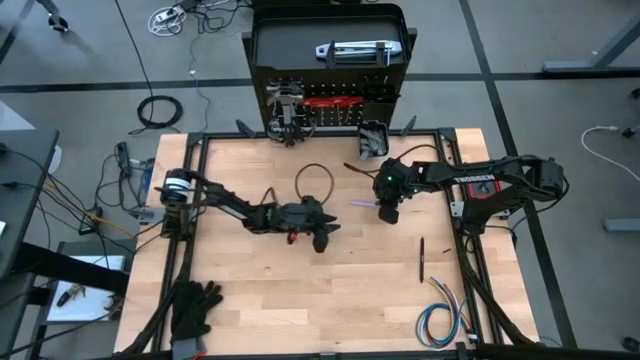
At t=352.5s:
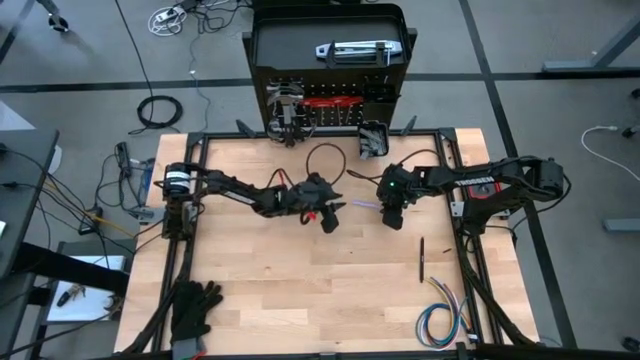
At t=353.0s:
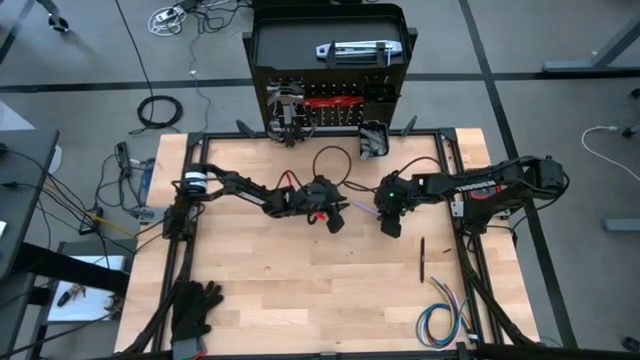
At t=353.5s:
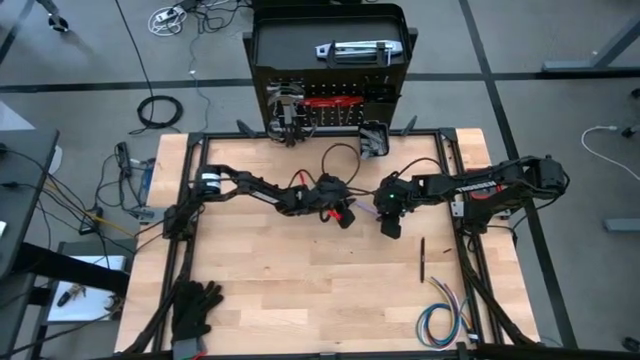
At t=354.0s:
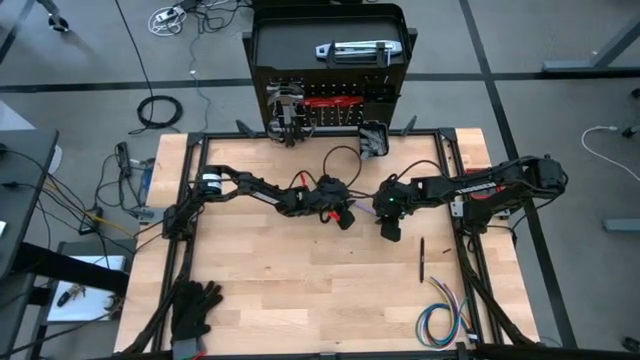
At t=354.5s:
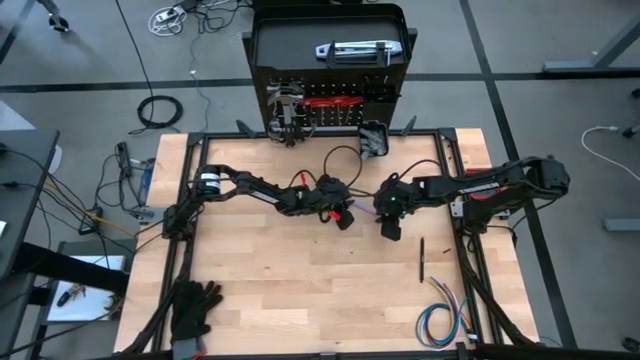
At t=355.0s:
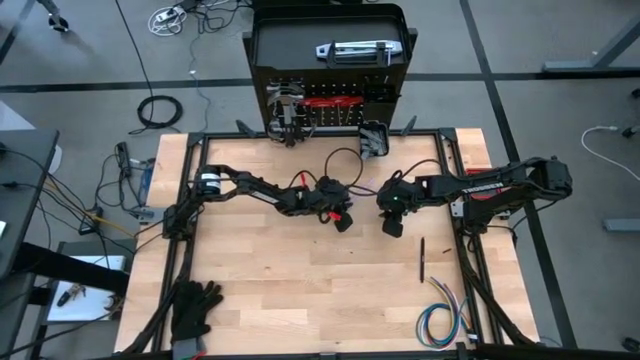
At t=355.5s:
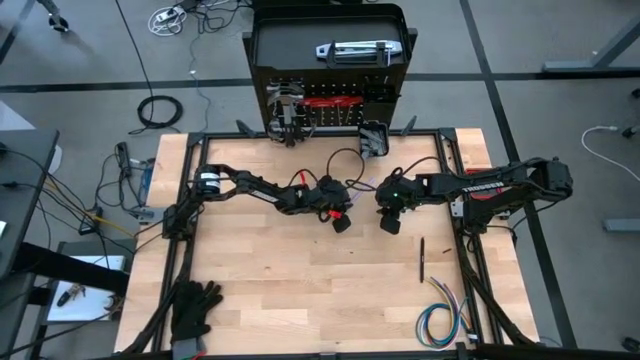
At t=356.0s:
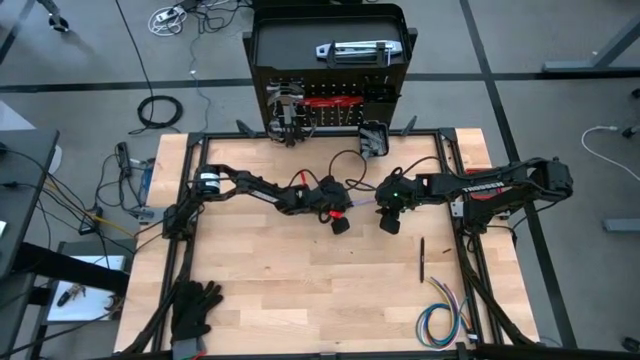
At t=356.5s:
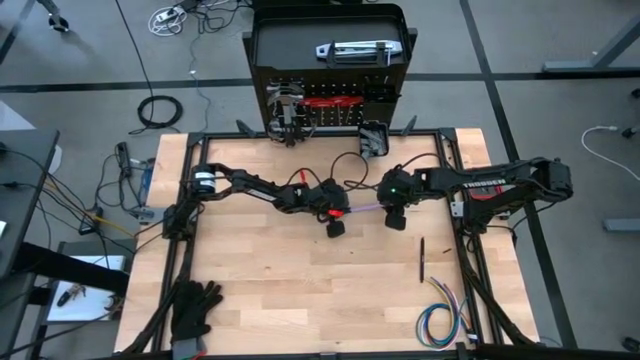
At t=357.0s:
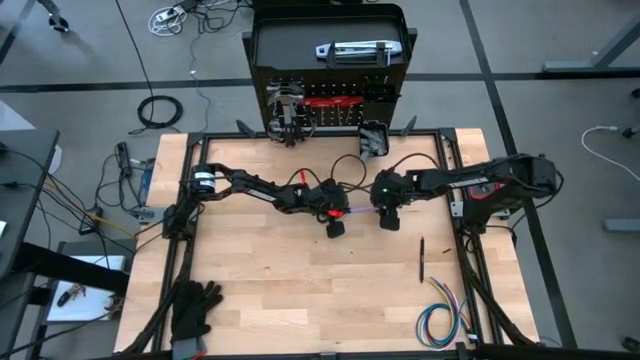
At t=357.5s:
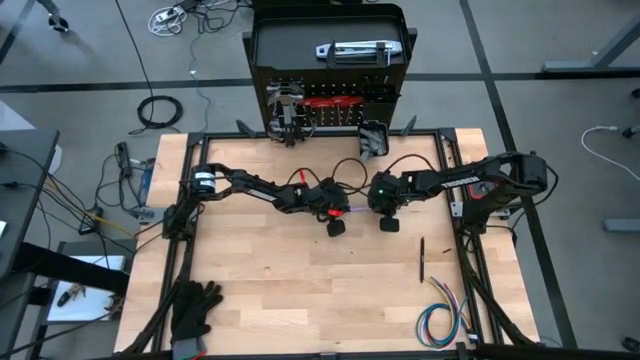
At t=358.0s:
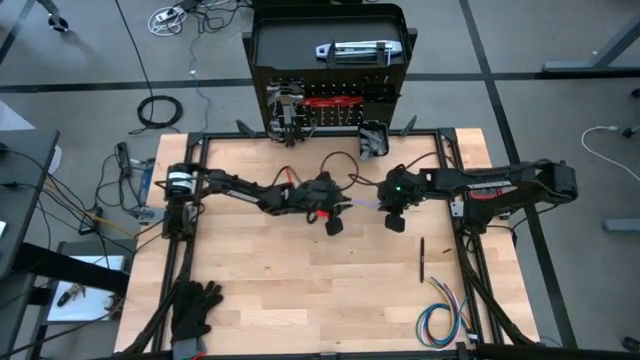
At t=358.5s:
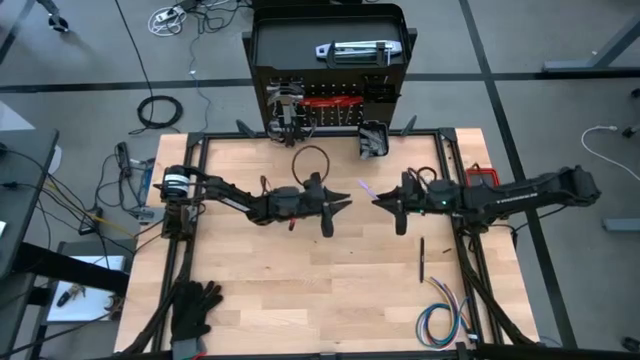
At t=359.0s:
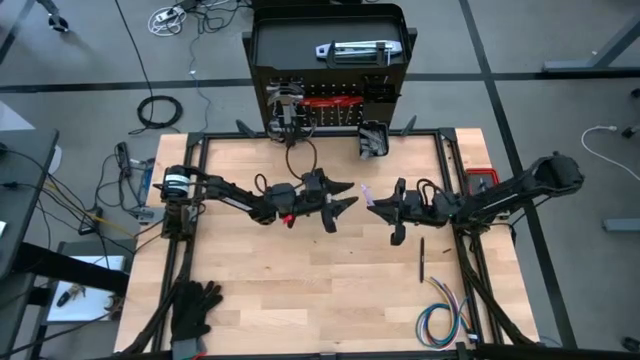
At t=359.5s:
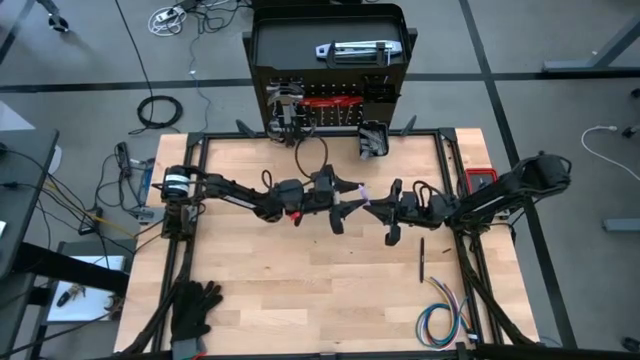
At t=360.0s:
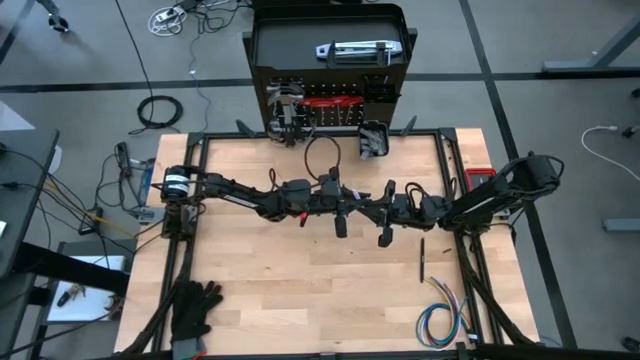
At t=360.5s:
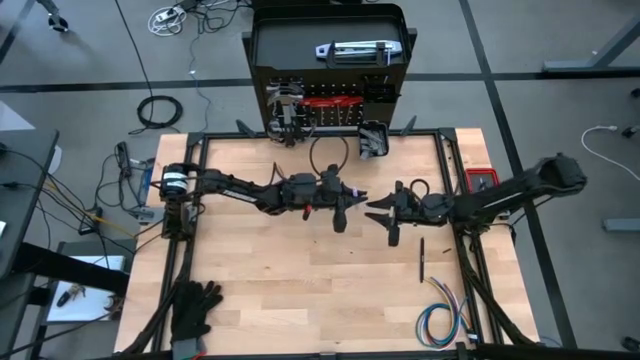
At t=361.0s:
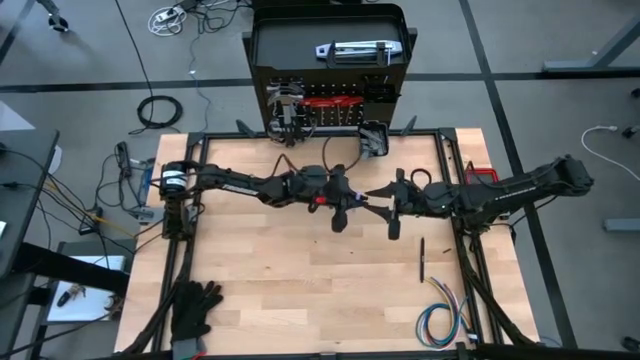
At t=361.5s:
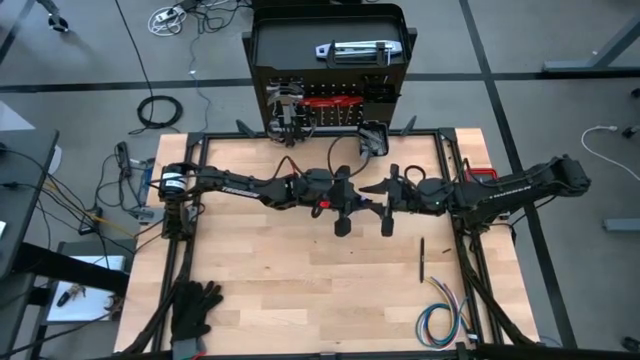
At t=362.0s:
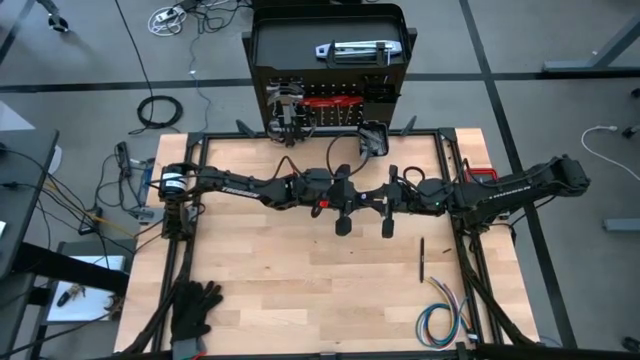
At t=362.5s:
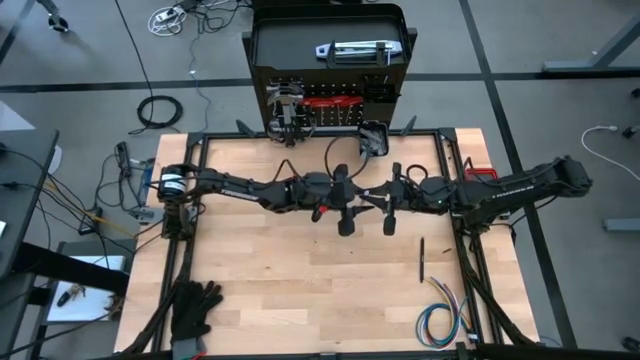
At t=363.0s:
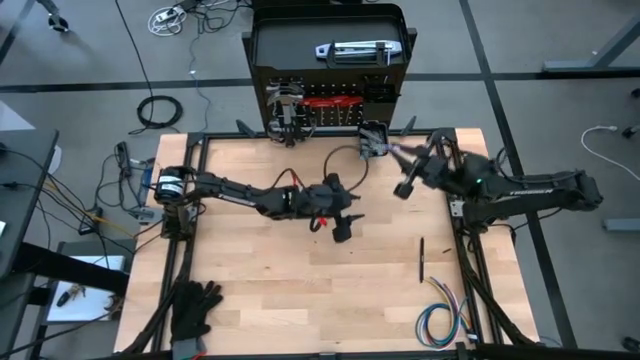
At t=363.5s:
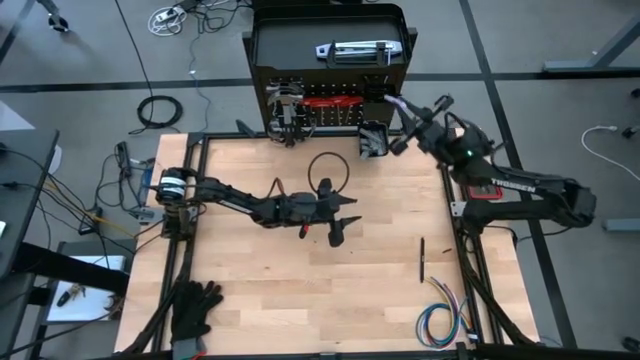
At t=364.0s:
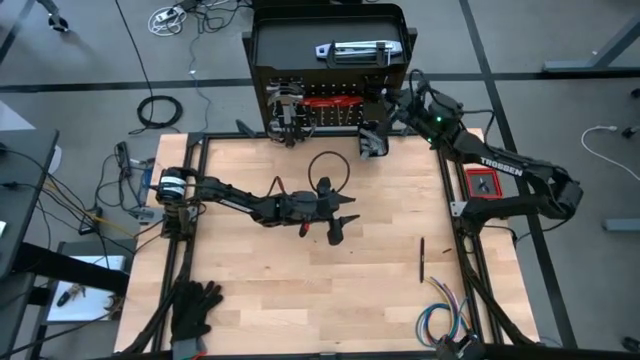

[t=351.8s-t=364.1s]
Task: Hang tools onto peg board
Put the pink pen on the pegboard

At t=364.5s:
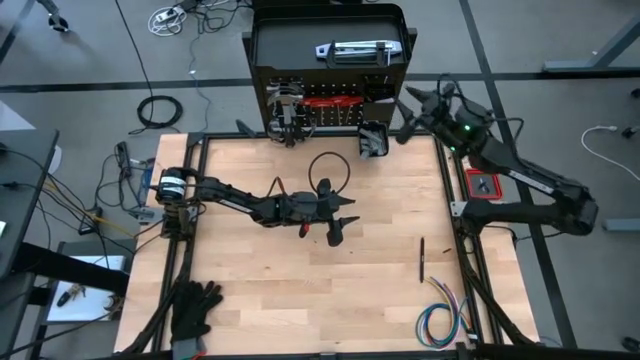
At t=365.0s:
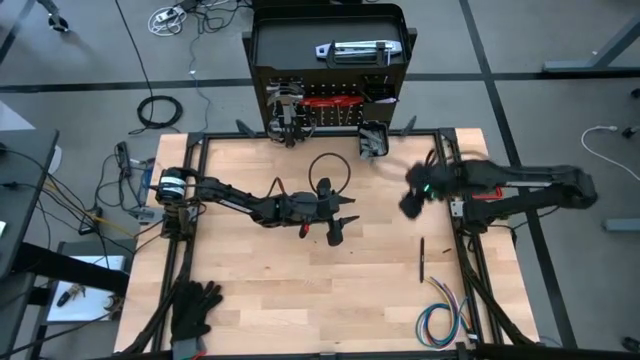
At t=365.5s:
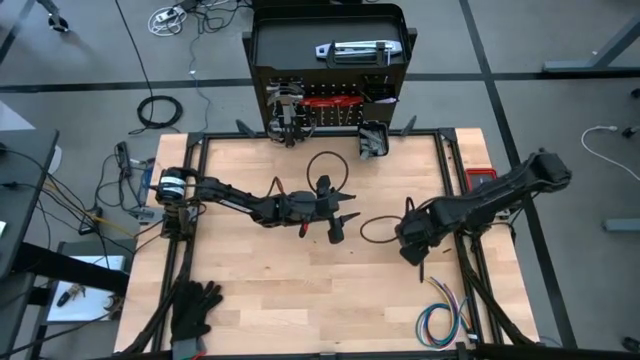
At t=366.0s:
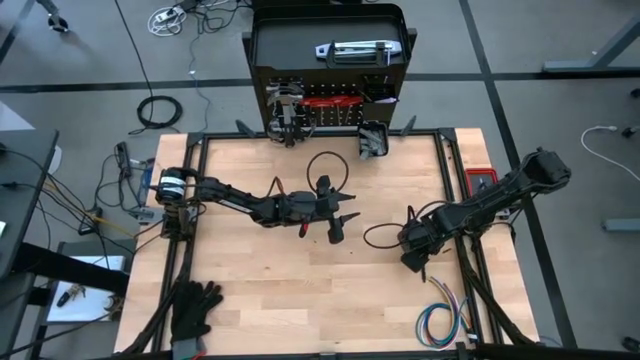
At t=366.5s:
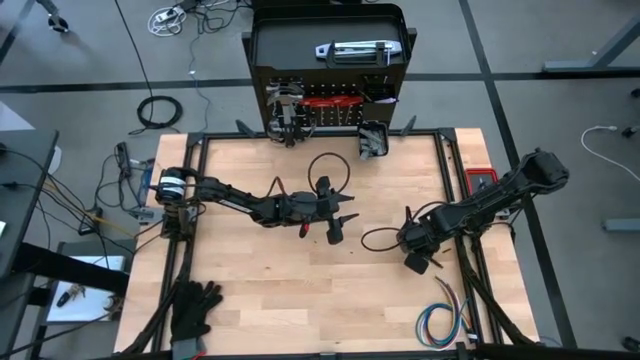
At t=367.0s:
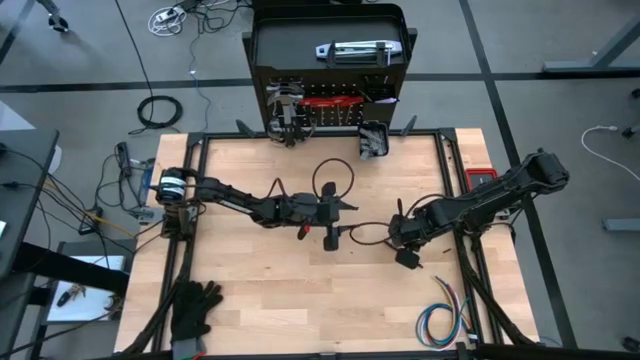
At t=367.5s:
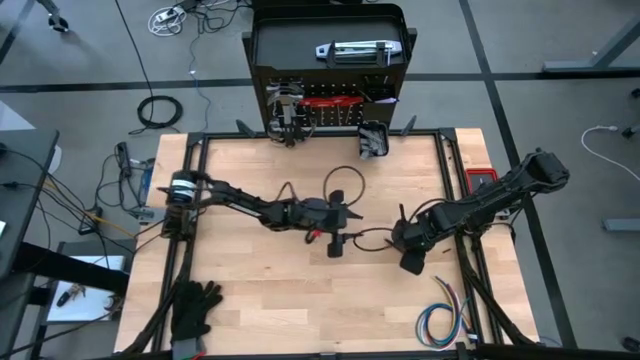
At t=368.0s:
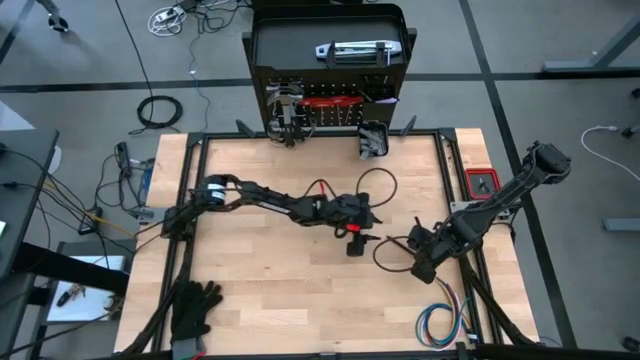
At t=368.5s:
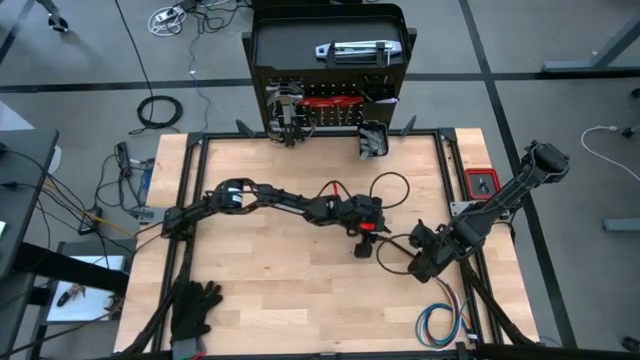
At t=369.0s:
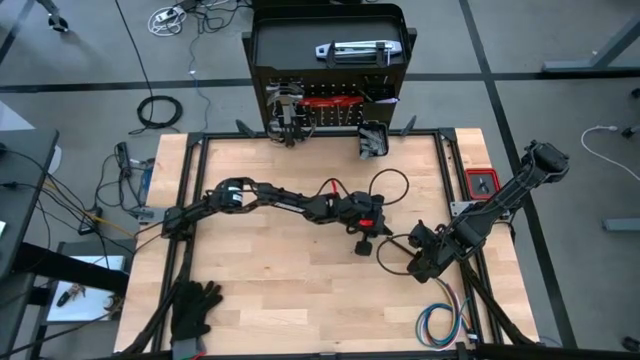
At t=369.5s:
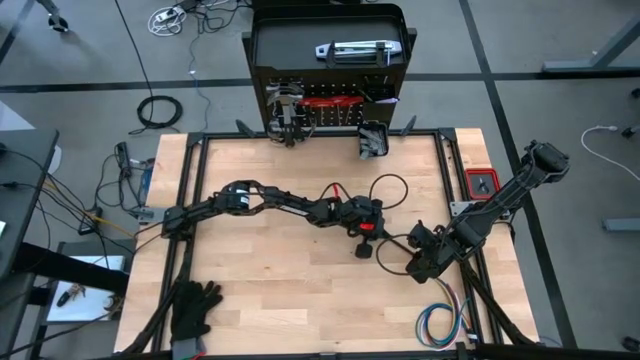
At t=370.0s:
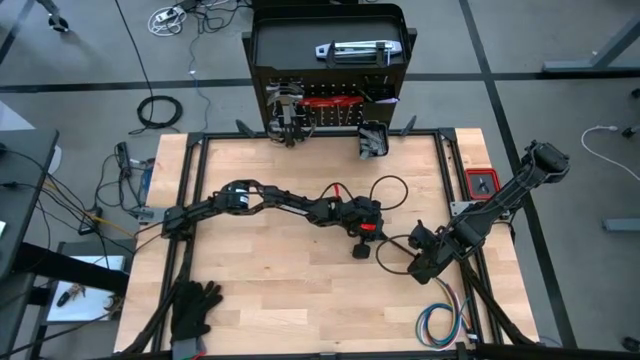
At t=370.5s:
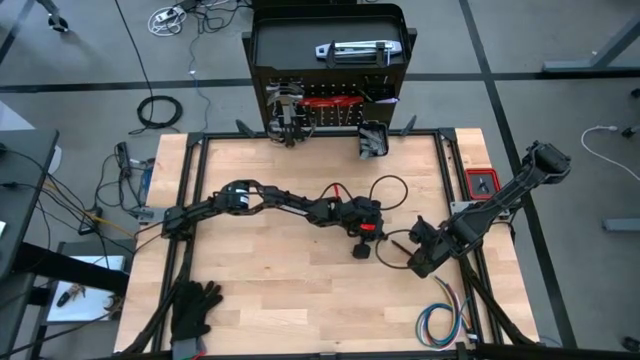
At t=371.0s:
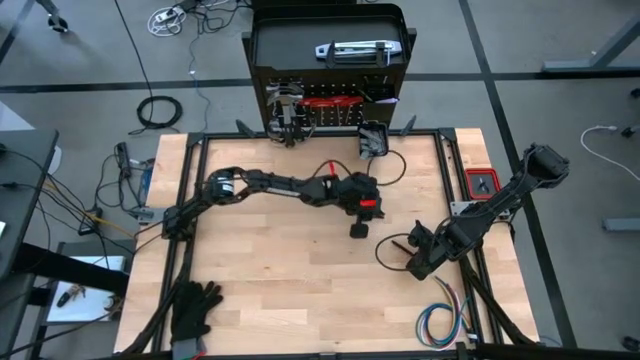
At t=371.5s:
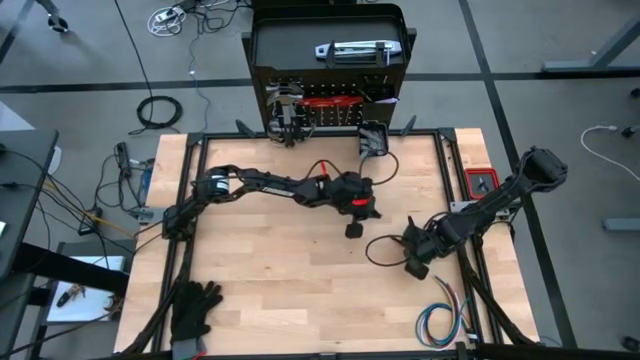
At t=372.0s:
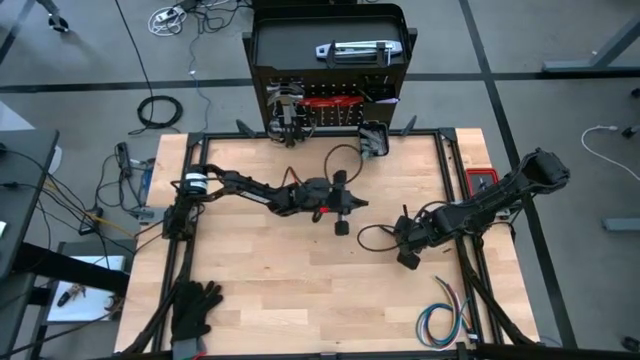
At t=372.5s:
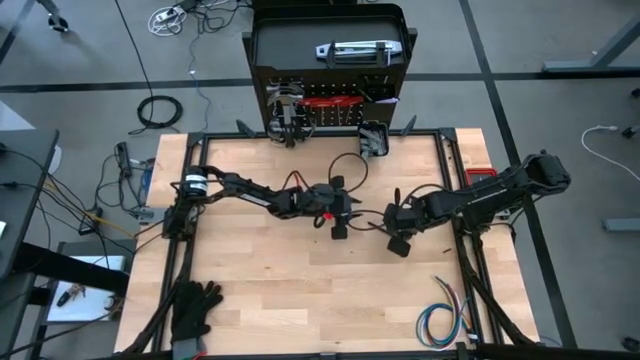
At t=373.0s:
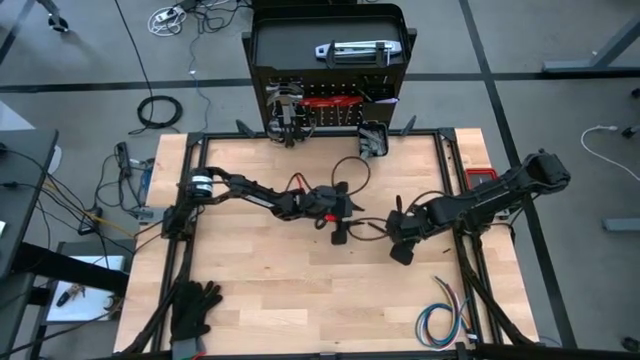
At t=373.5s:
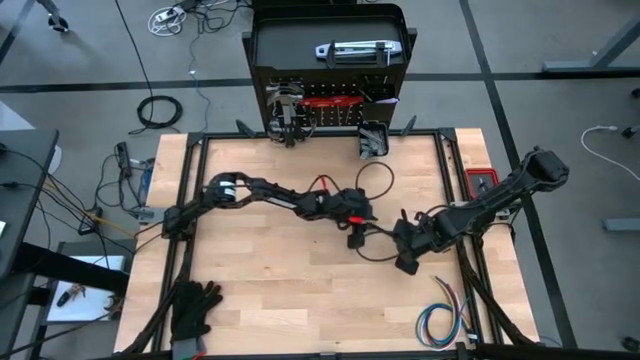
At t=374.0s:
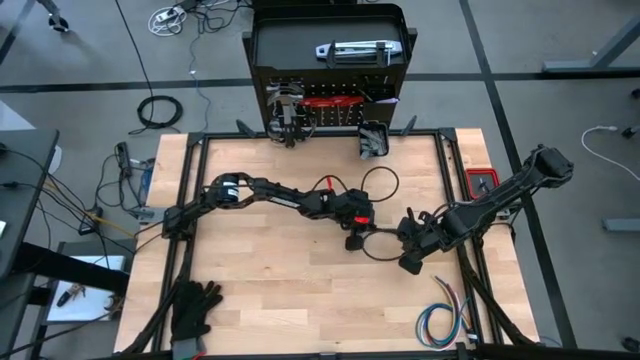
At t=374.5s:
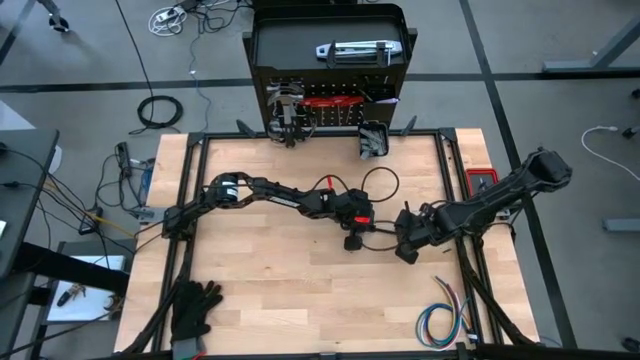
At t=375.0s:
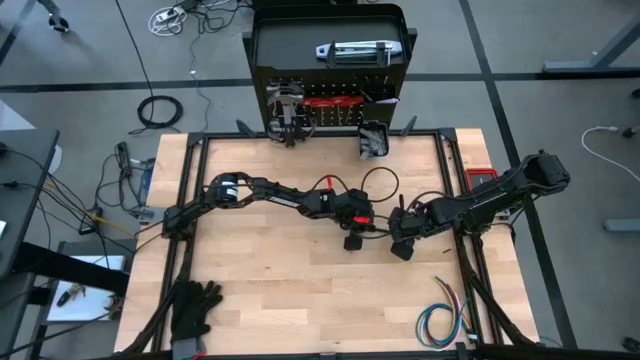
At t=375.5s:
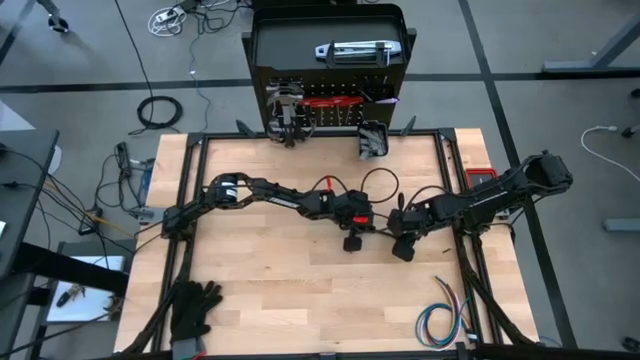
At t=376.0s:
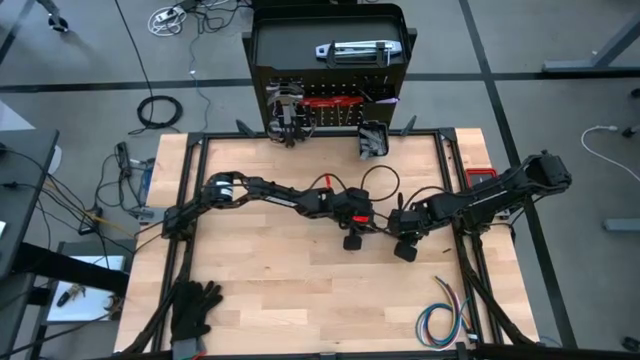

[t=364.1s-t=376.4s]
Put the black pen on the pegboard
